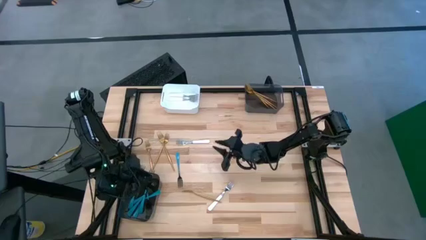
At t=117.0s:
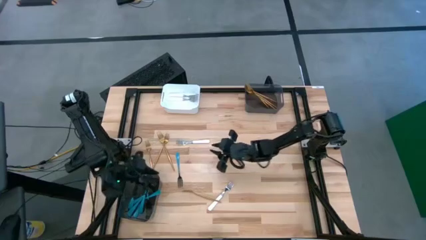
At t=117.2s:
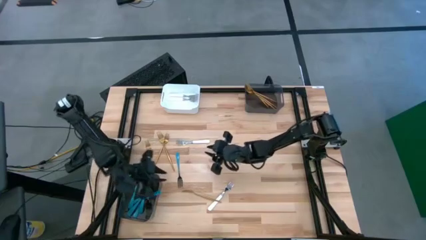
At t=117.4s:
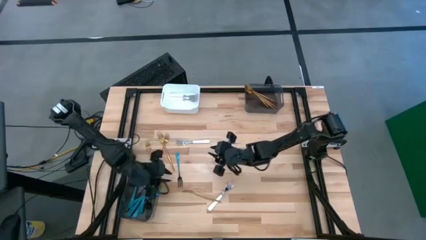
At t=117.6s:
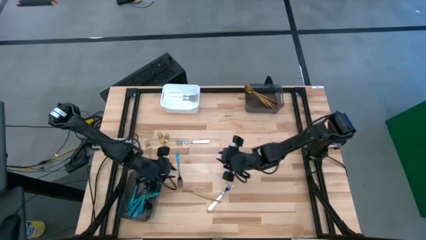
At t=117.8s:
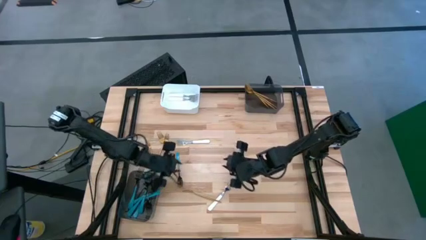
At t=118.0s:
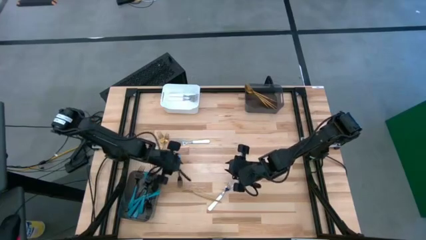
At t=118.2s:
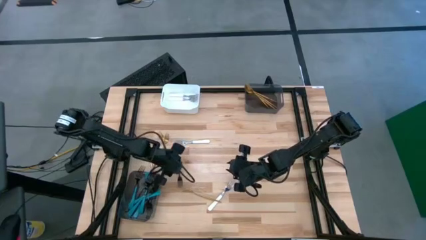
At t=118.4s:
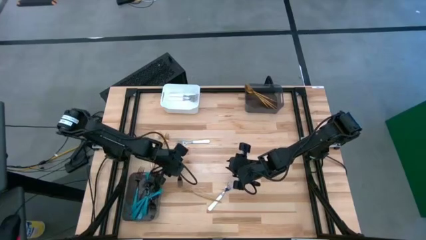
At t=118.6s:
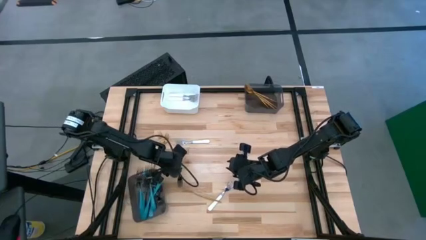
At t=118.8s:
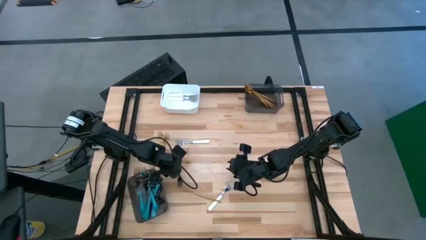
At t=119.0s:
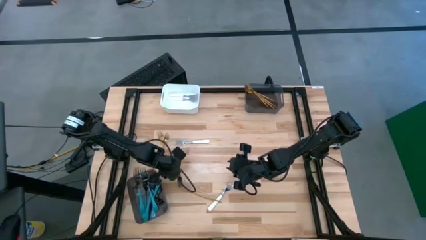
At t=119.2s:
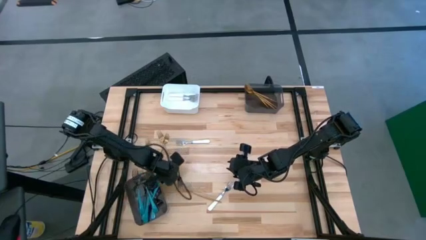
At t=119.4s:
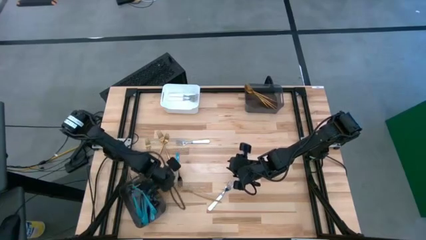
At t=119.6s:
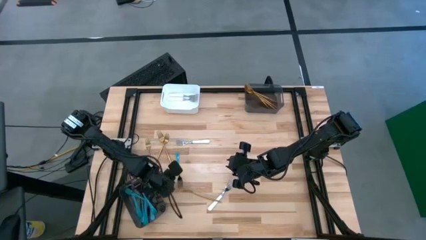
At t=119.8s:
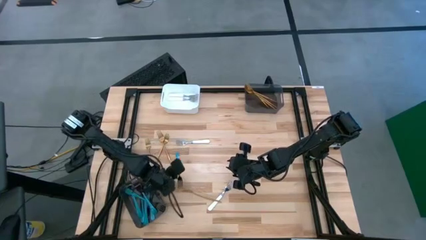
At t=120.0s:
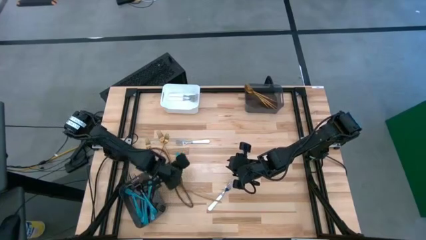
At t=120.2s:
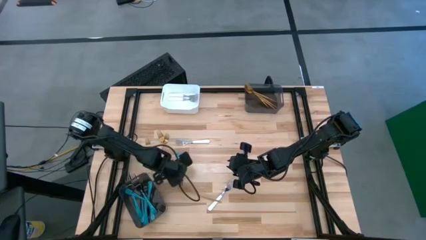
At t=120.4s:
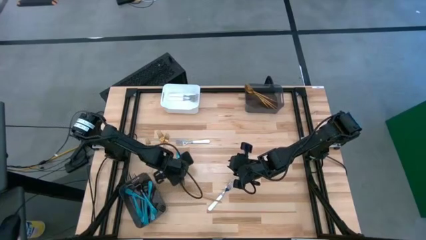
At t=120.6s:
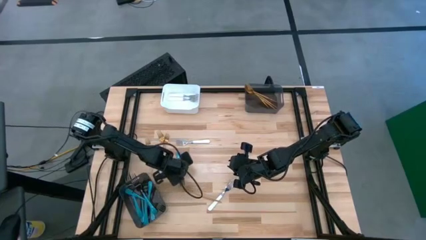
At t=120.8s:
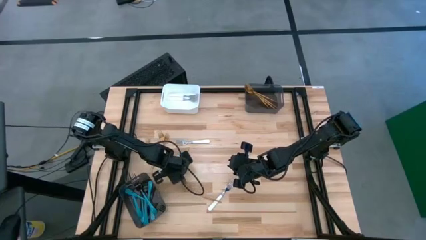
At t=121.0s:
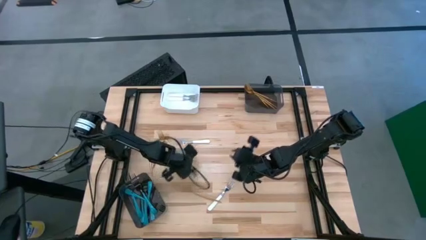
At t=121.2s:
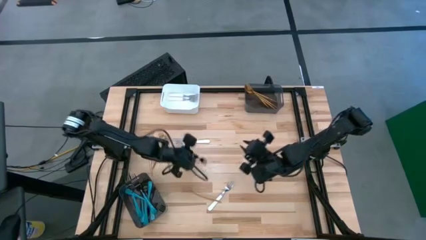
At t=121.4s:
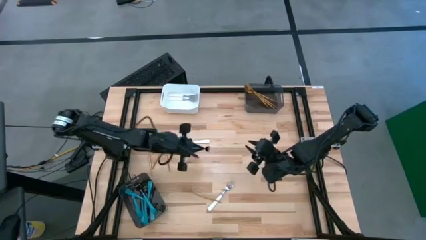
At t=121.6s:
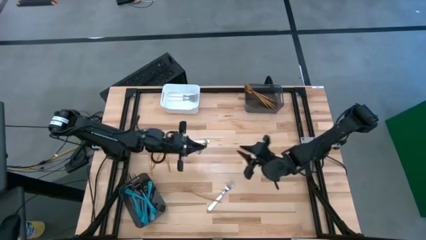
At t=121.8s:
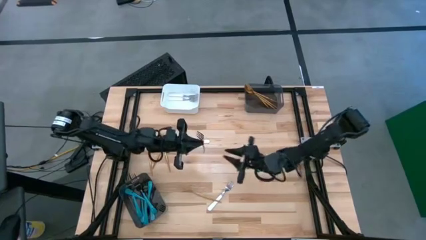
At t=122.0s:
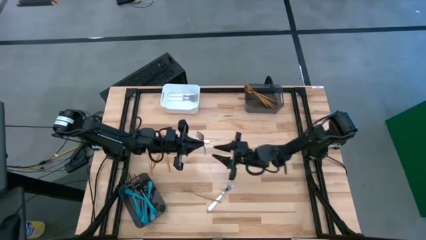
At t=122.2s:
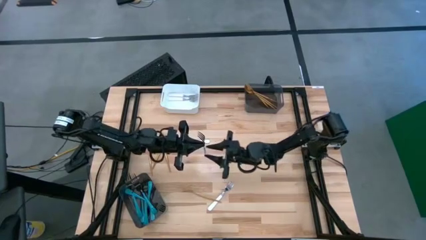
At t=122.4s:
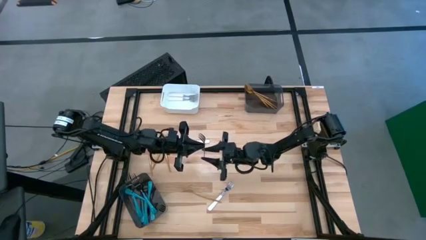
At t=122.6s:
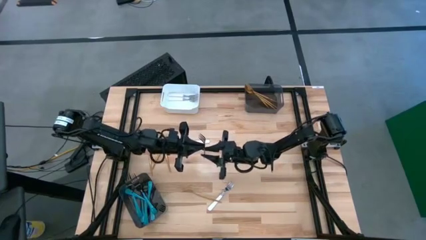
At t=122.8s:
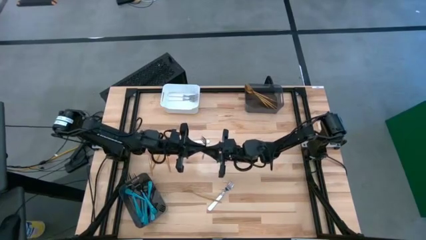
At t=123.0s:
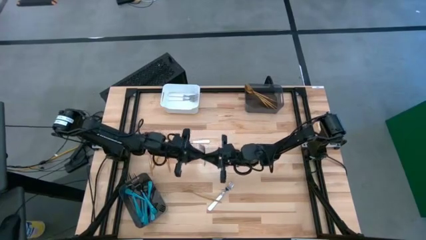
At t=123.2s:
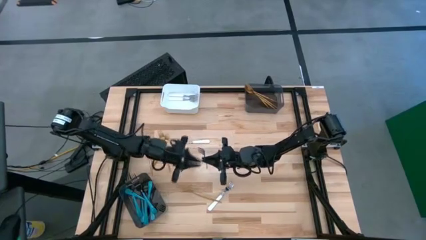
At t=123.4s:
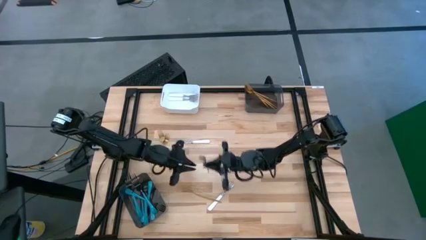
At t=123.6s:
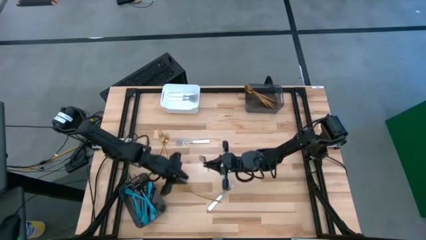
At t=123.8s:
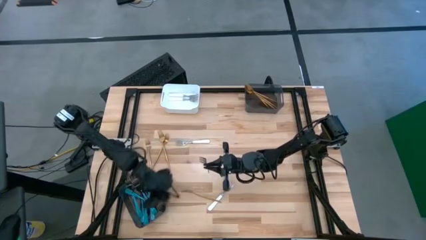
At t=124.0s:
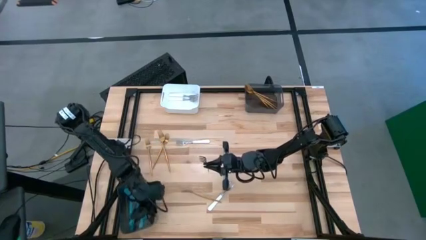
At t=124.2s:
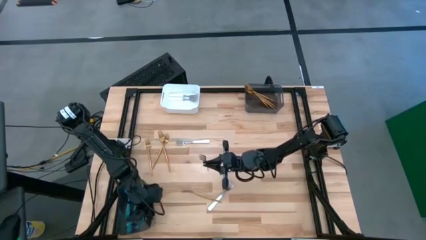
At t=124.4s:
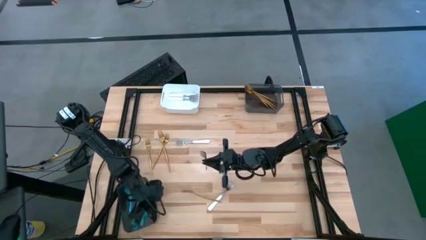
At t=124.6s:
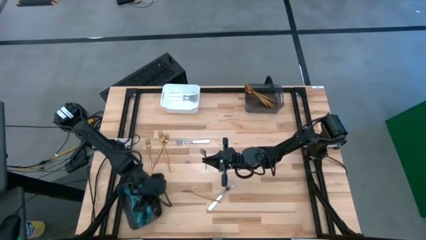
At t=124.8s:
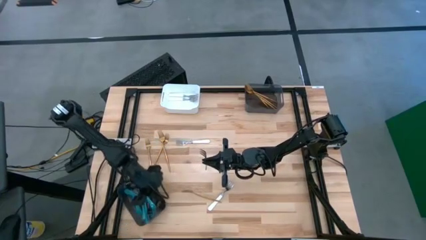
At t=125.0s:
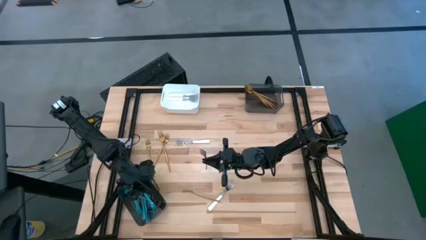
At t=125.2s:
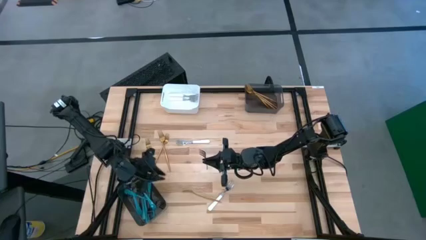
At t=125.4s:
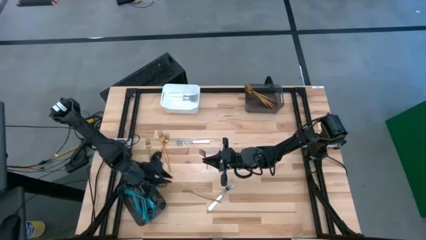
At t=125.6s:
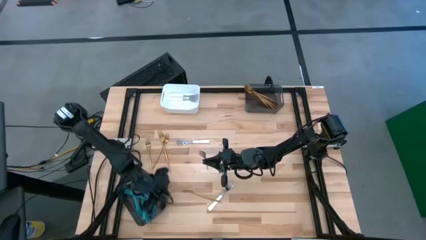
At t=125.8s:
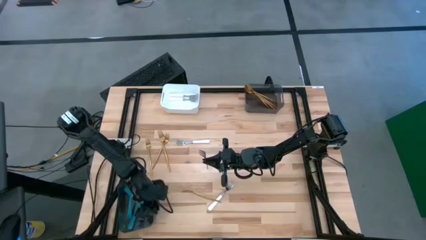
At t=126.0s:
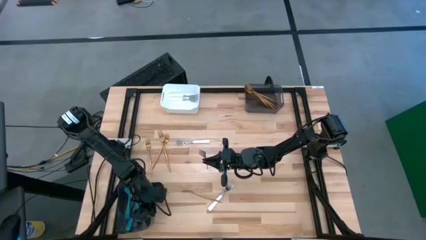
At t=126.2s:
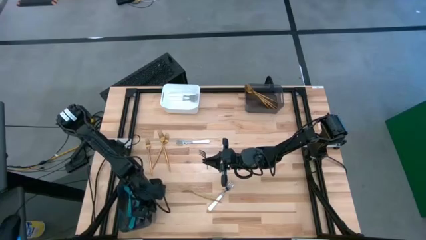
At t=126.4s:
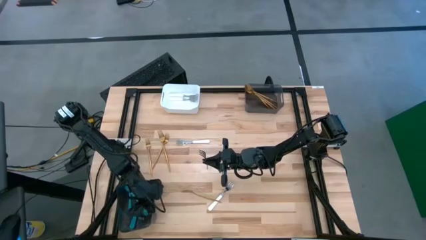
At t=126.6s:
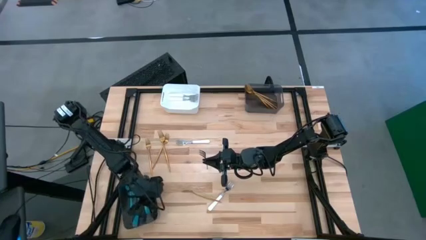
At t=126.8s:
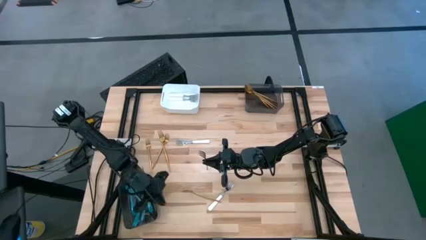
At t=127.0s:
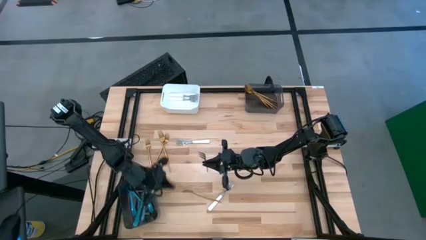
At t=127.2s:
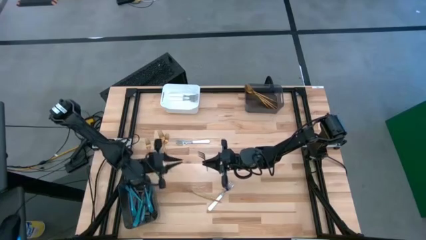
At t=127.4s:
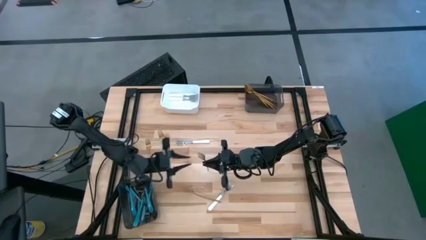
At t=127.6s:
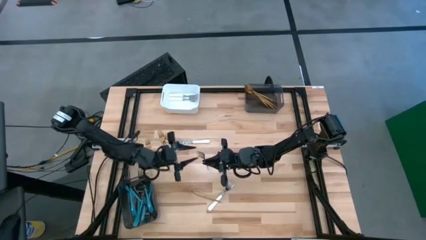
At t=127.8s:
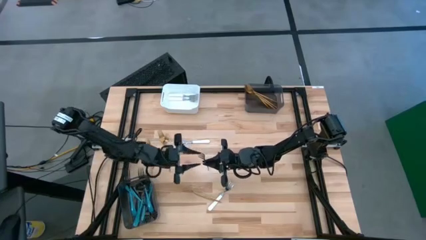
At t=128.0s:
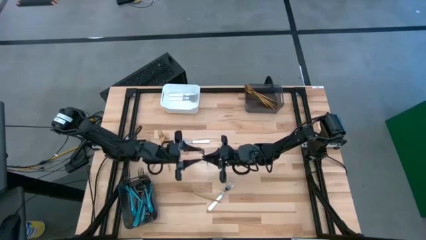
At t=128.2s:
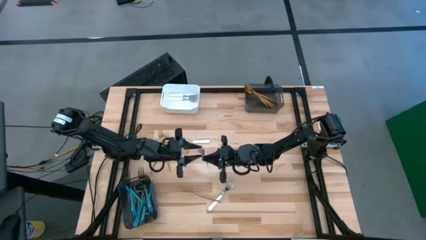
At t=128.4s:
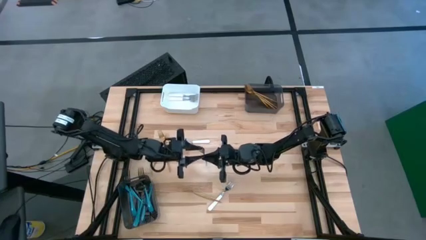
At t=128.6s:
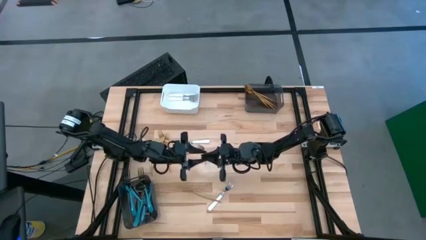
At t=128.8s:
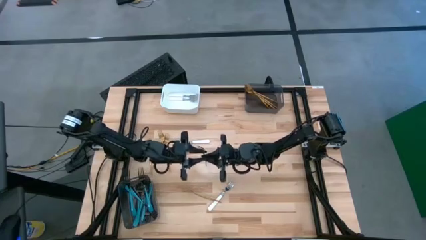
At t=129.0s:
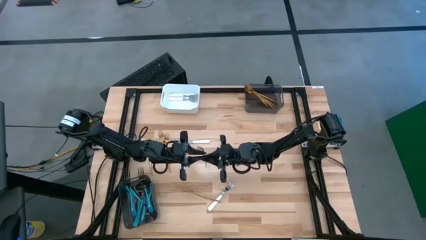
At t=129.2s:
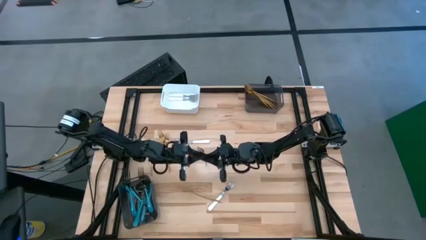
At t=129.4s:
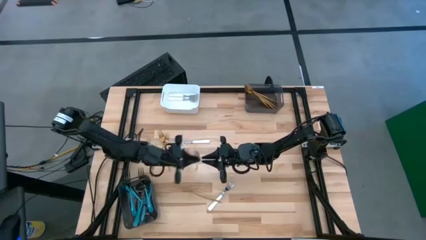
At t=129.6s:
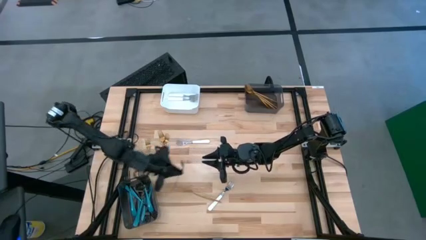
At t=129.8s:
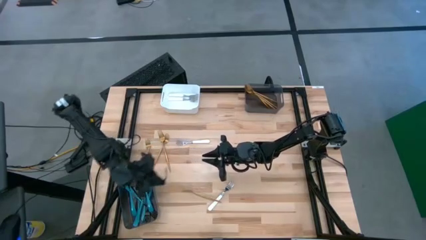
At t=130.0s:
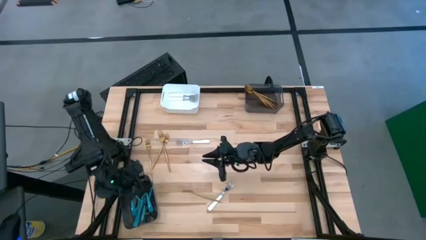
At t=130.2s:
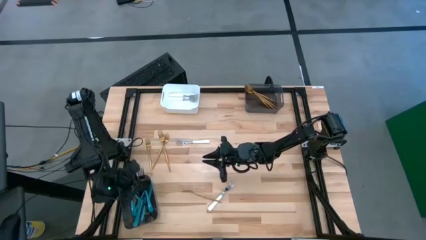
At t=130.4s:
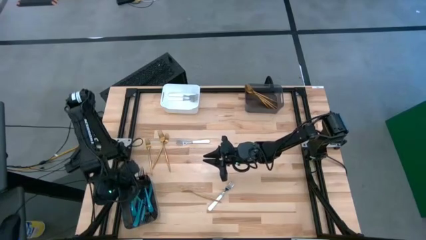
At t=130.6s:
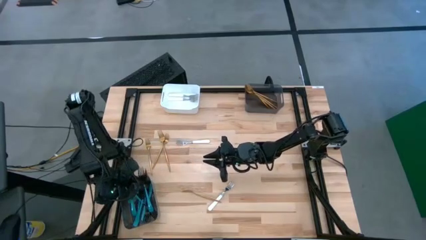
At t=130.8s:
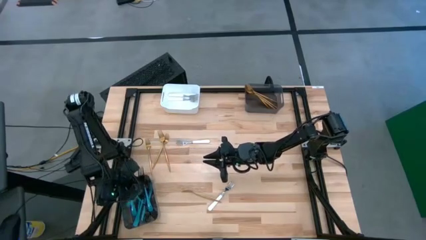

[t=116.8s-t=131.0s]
Task: Sort silverware by color (type)
Put the blue fork into the bottom black bin

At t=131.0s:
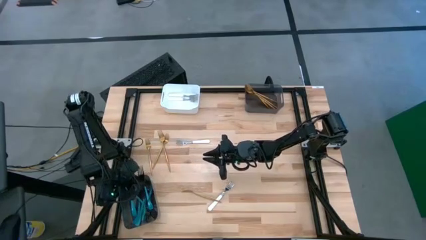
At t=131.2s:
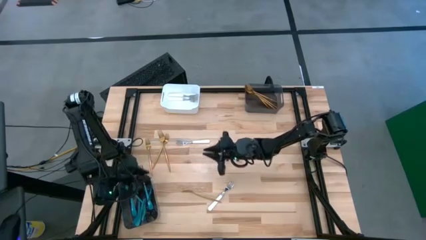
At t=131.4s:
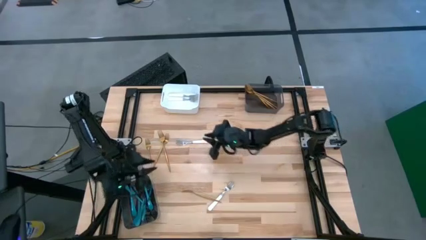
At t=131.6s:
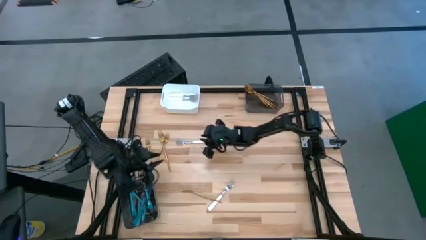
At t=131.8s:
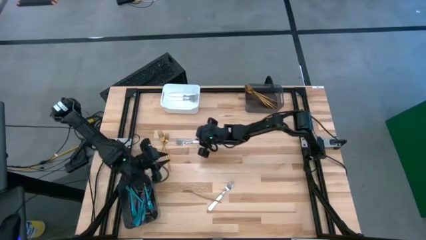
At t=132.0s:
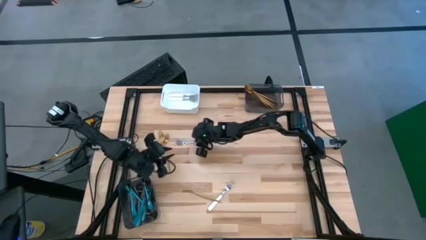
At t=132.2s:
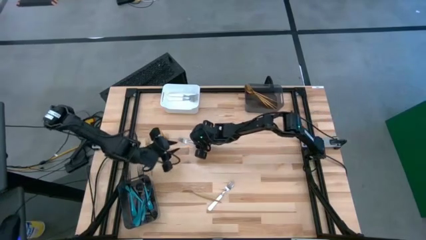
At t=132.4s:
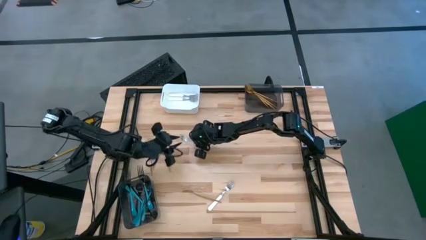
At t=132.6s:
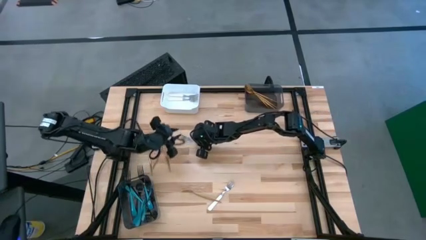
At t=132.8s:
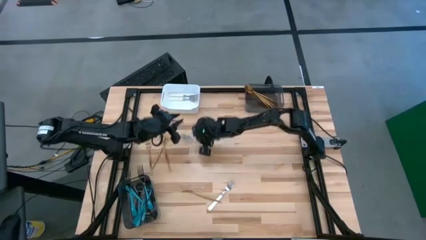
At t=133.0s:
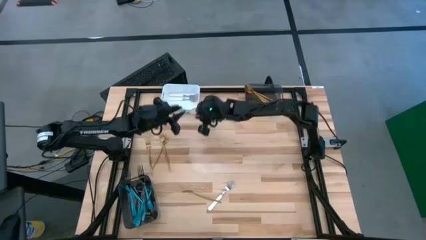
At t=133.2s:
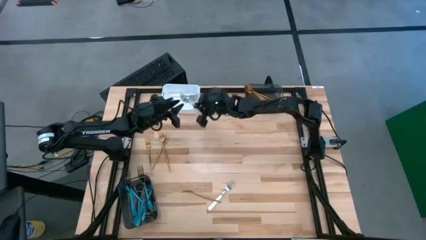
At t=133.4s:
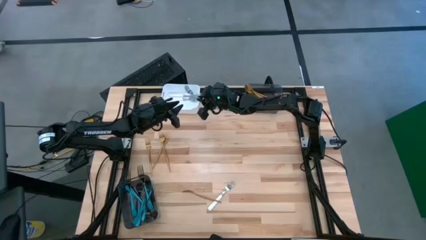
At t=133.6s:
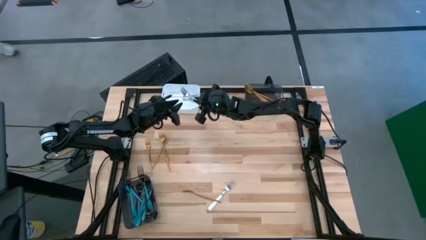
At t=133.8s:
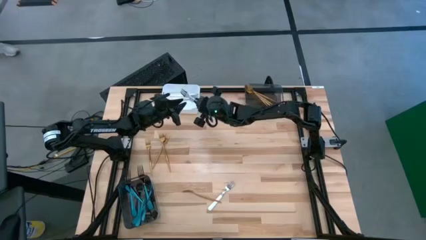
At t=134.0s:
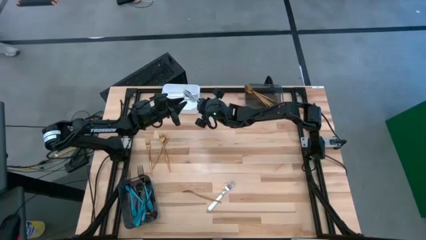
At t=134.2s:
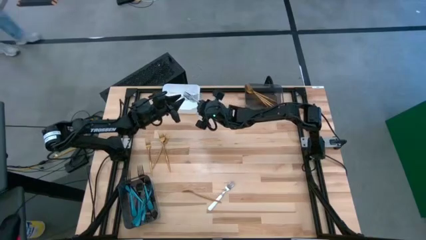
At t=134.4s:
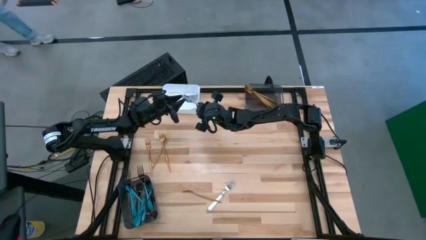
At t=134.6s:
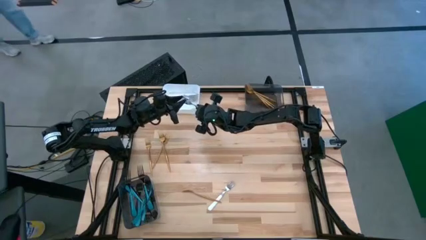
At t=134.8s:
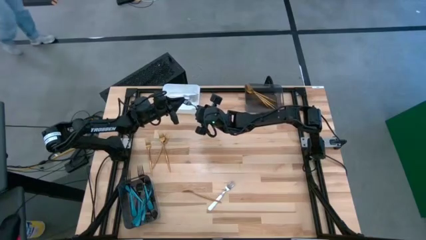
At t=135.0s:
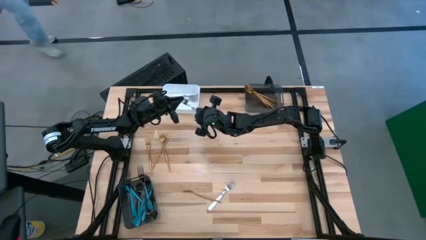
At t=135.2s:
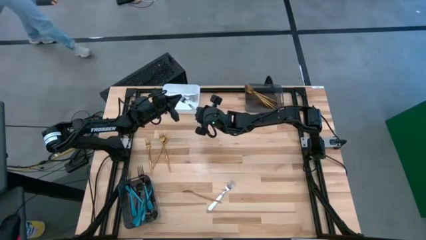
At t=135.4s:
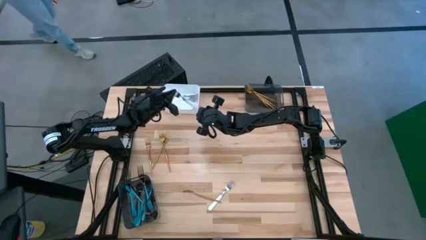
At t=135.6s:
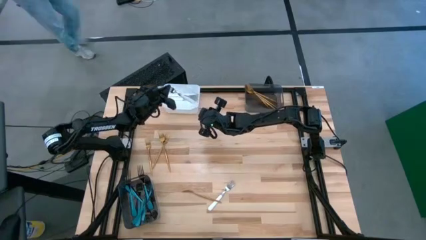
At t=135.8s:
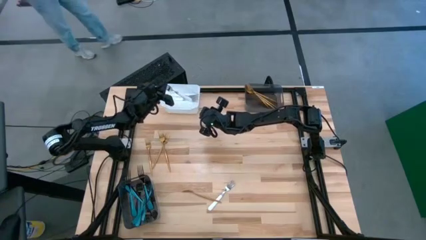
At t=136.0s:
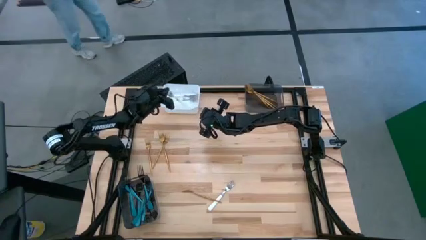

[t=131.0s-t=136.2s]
Put the white fork into the white bin
